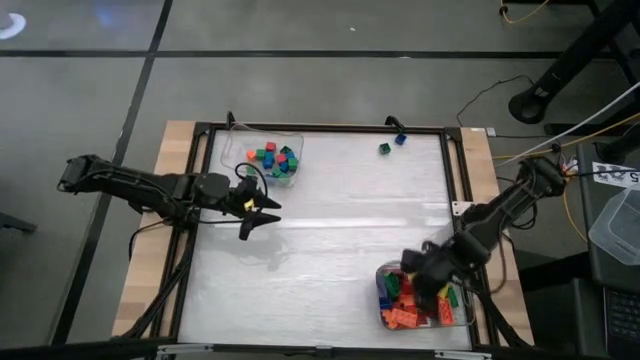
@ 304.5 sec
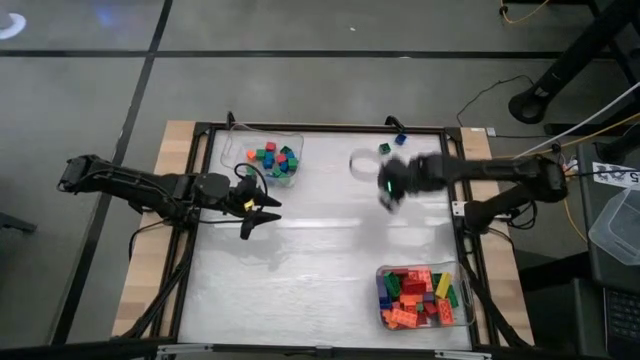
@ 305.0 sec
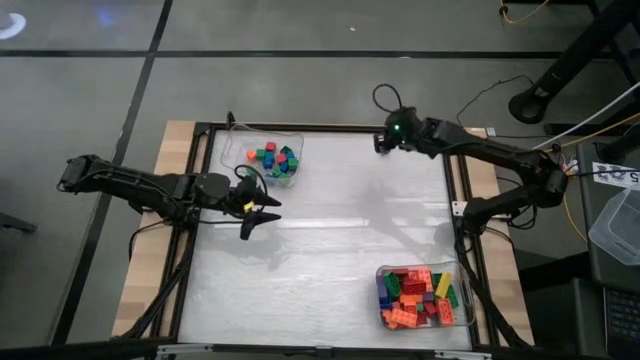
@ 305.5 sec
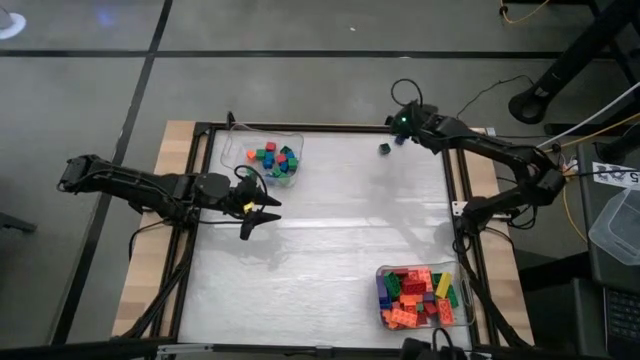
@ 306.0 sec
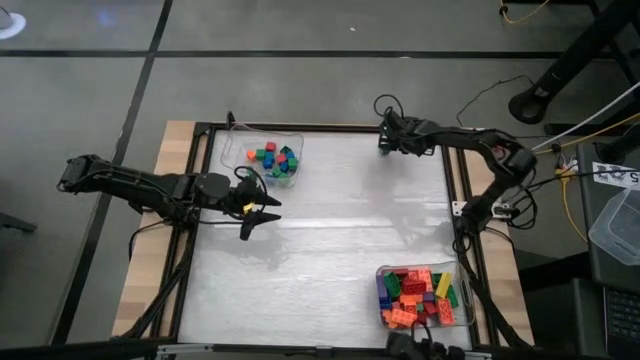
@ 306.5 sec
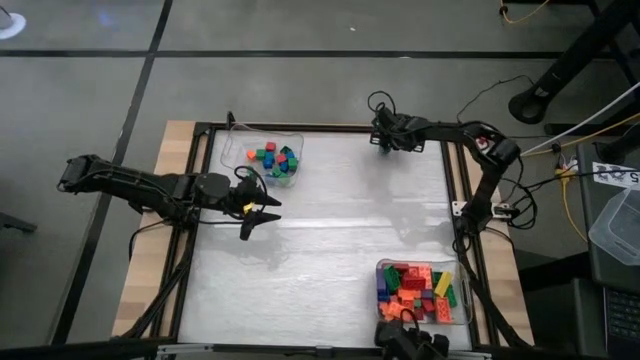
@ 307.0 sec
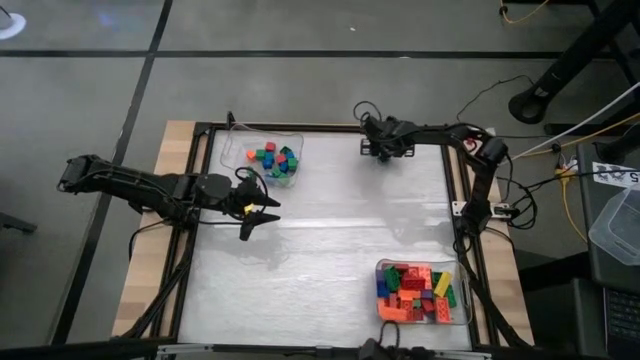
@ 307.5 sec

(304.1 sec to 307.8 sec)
Task: Sort blocks by size
Adjust the green square game piece

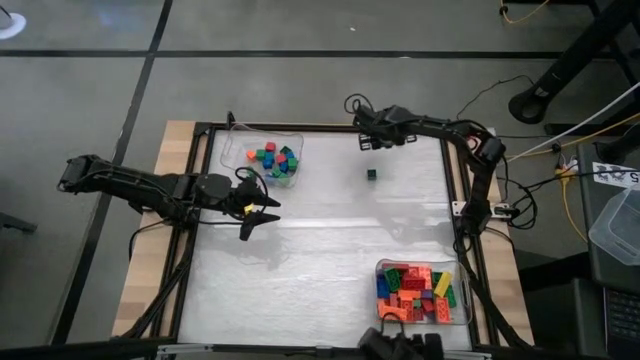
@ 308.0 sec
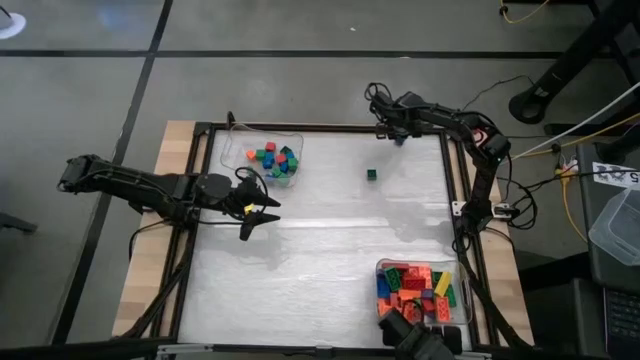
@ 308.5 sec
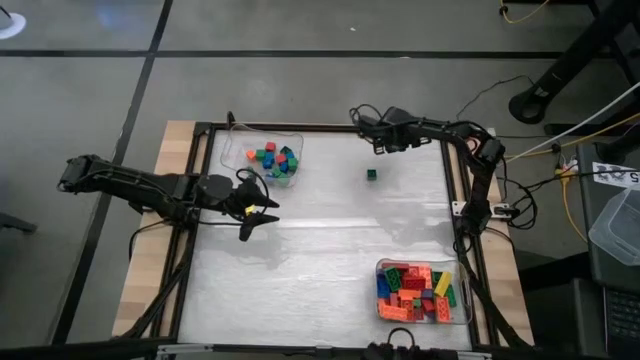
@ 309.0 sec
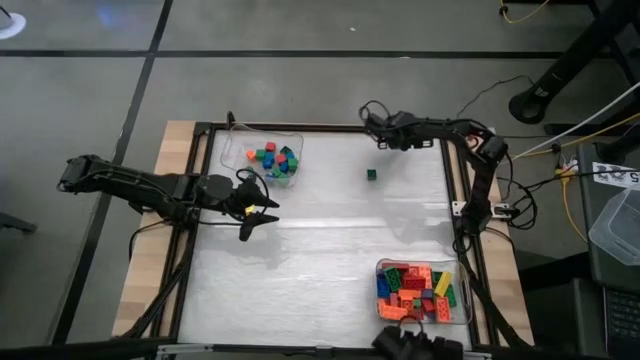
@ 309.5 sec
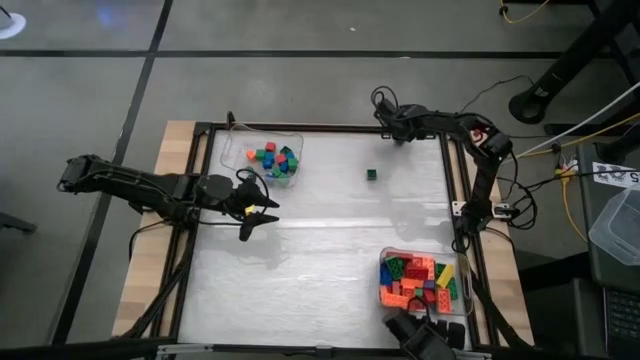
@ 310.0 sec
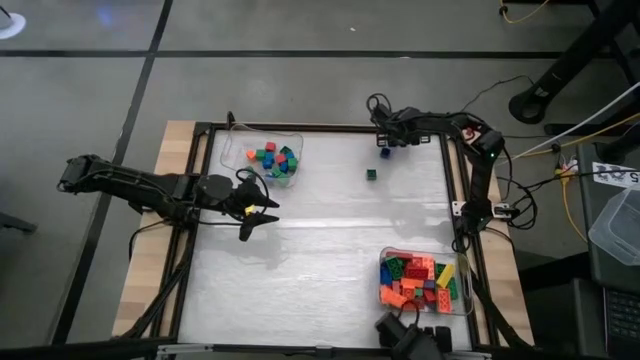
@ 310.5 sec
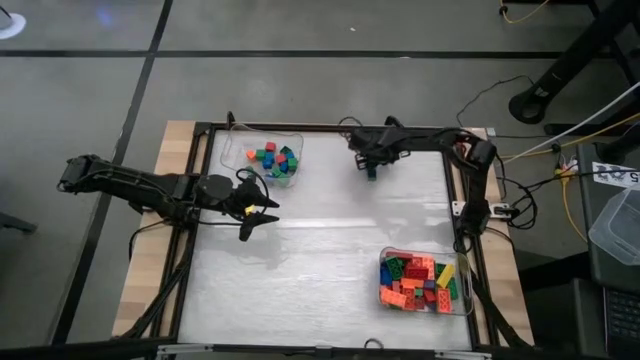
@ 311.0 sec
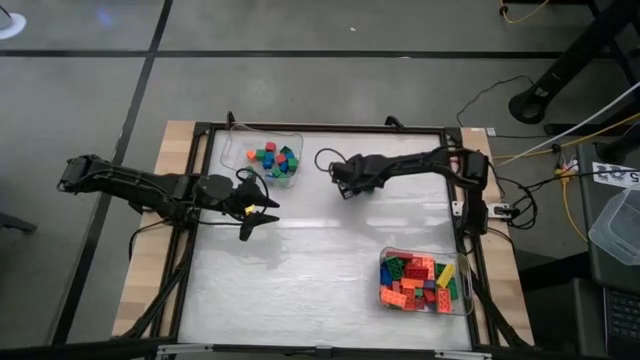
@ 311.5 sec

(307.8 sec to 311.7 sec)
Adjust the blue square game piece

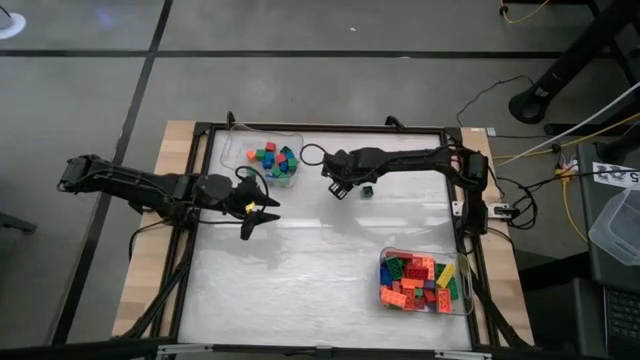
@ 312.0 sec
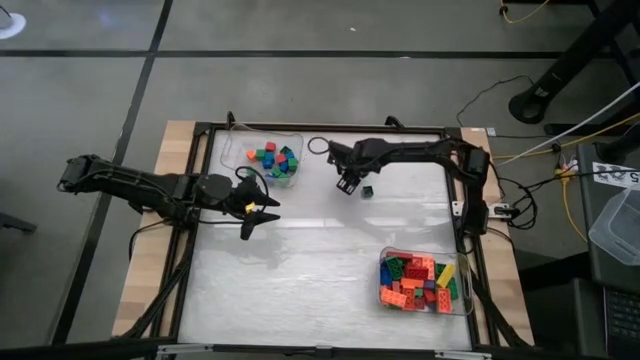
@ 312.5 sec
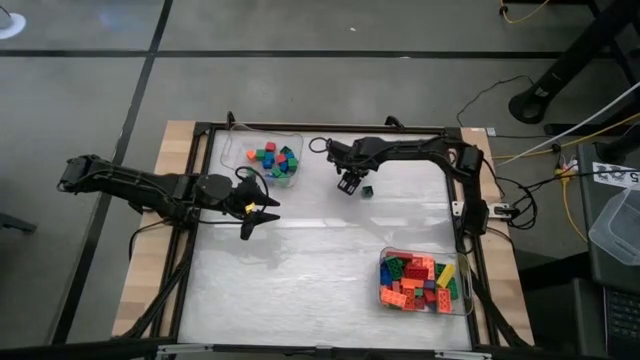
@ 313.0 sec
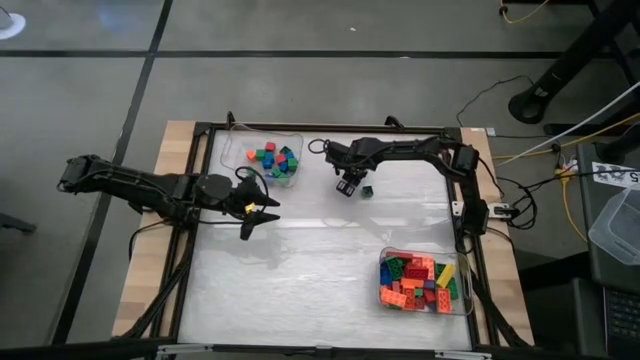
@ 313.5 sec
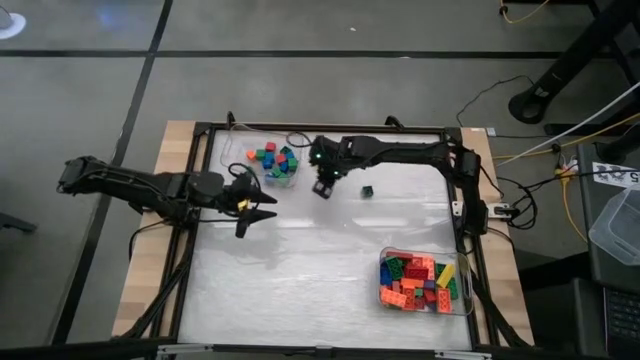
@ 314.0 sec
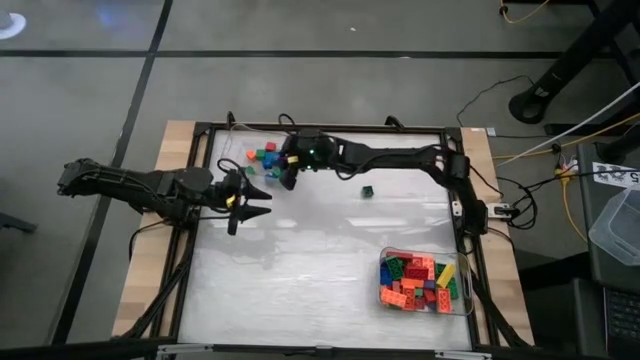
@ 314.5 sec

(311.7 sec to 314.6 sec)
Put the blue square game piece into the top transparent bin

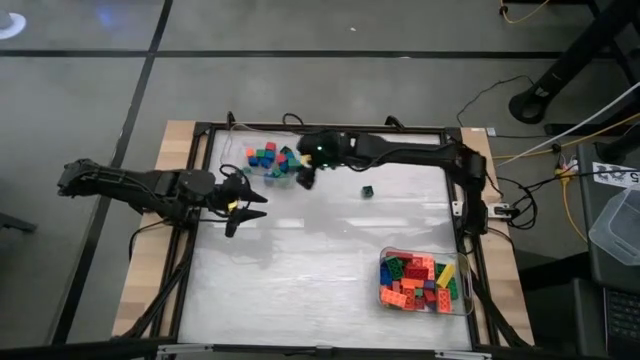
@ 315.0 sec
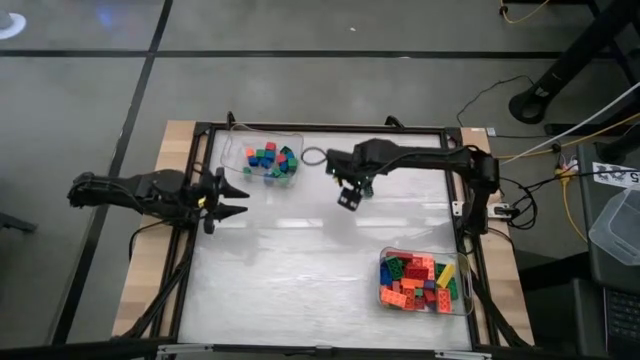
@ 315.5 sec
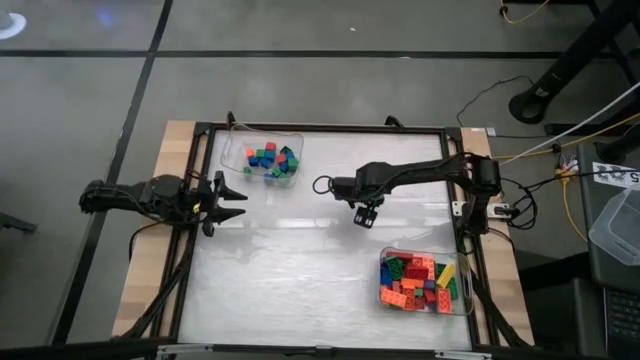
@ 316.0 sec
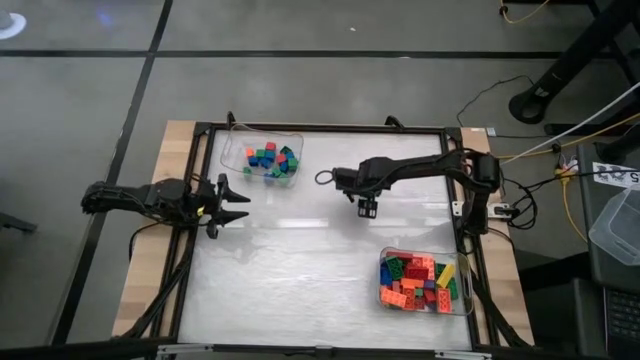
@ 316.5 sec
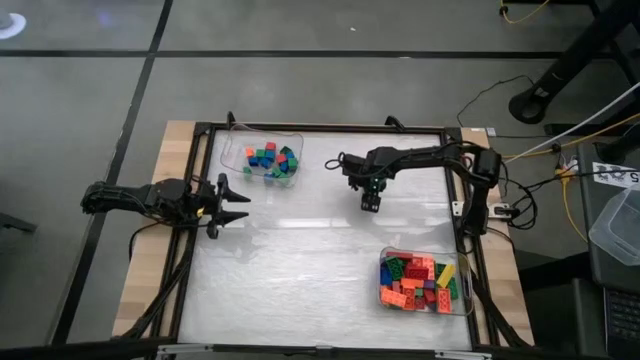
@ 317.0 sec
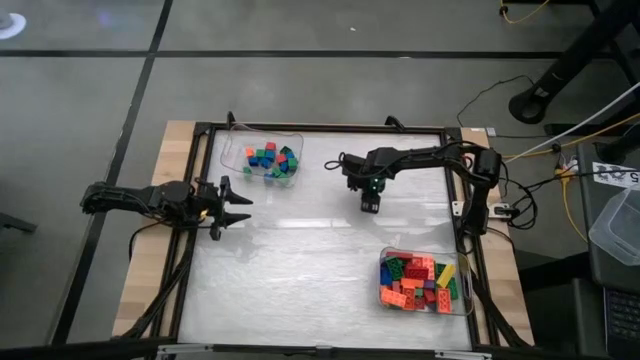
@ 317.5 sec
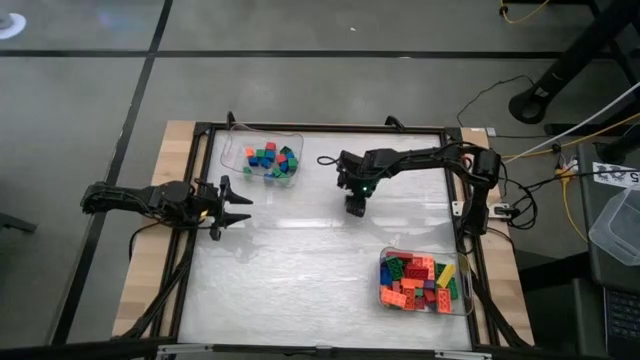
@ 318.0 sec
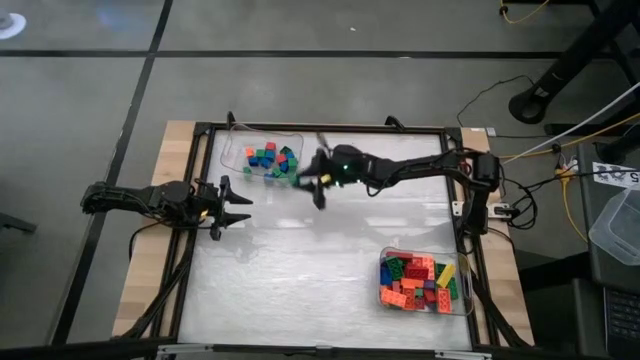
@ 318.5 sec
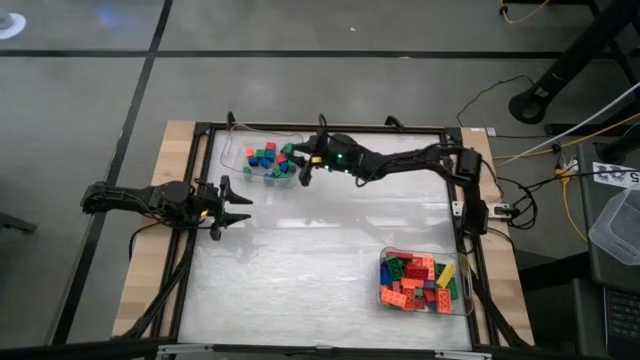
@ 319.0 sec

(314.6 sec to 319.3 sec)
Put the square green game piece into the top transparent bin

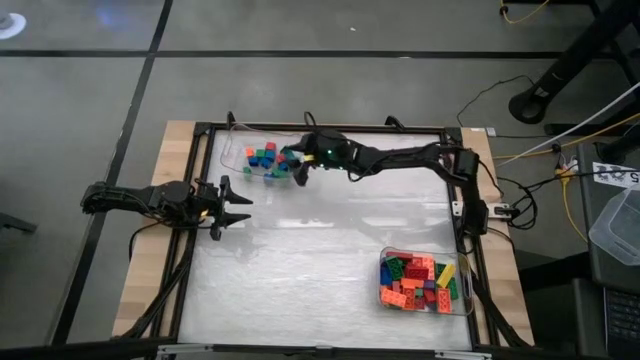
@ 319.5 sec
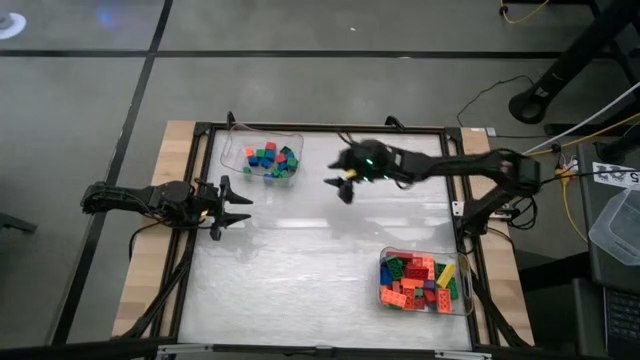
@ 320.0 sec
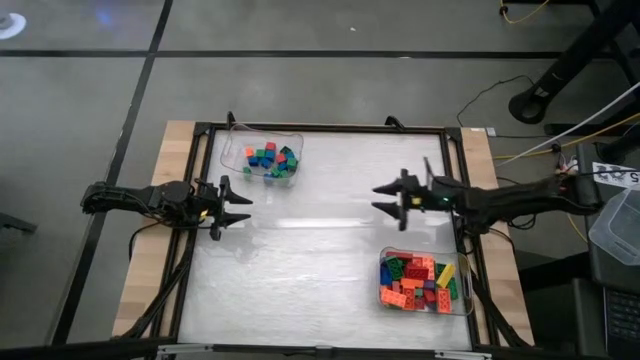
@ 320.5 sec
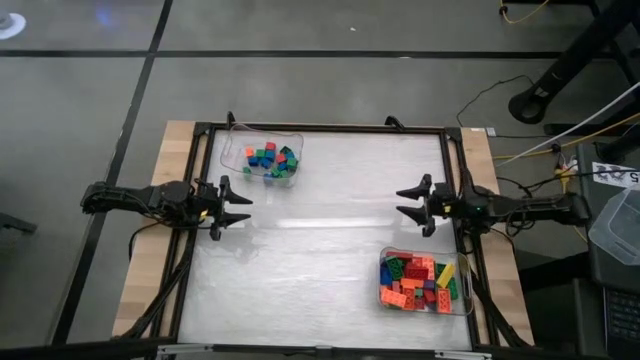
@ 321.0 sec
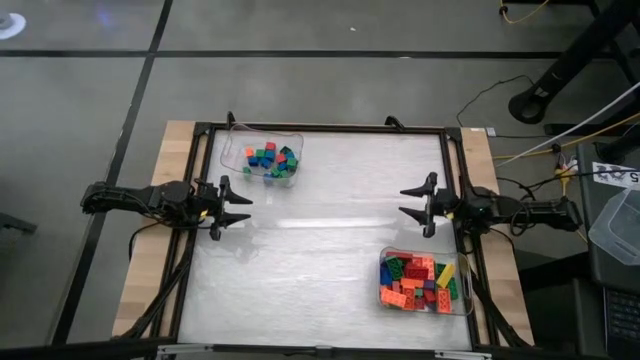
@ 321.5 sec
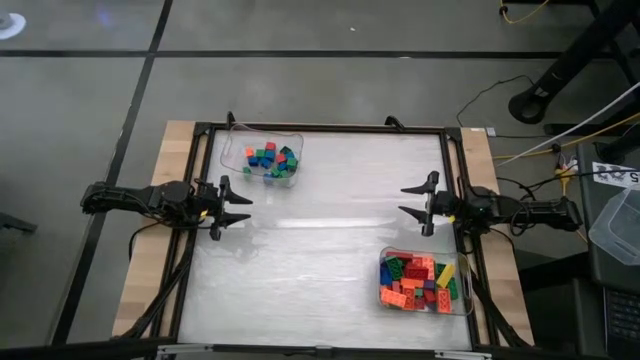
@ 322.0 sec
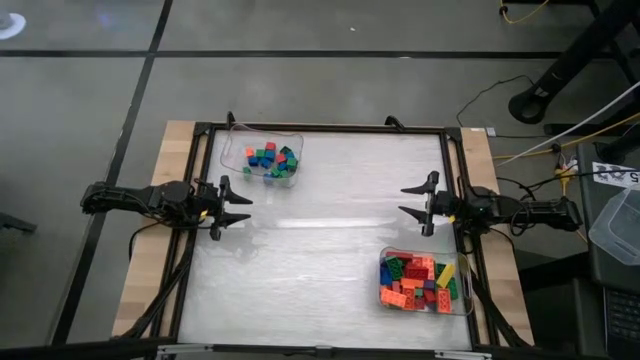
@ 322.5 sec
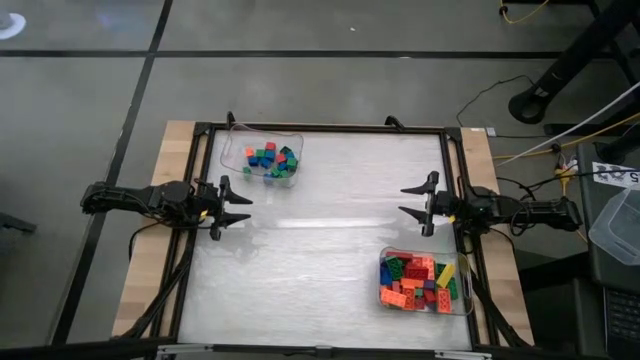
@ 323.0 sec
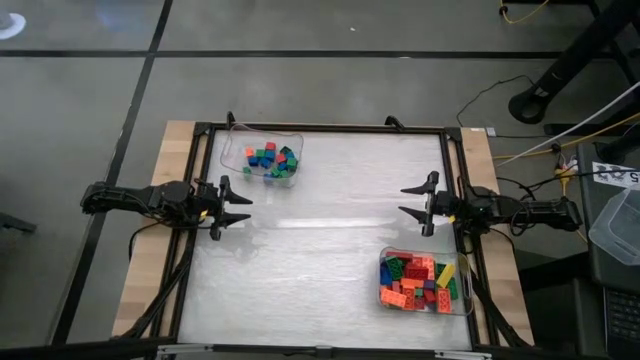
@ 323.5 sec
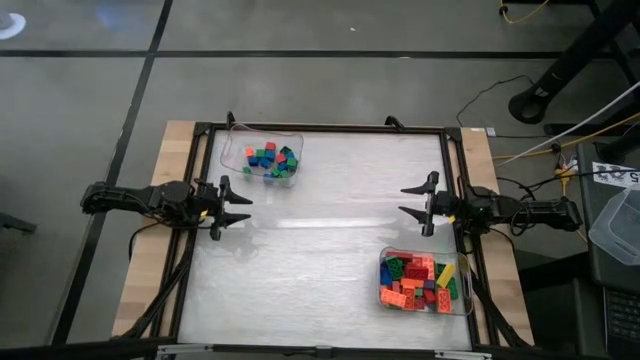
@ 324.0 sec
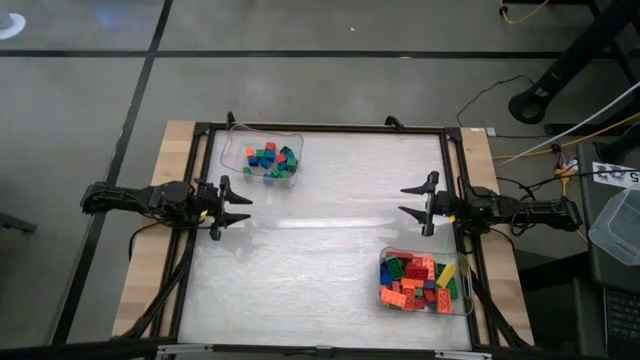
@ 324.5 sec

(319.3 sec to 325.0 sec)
Return to Home Position
